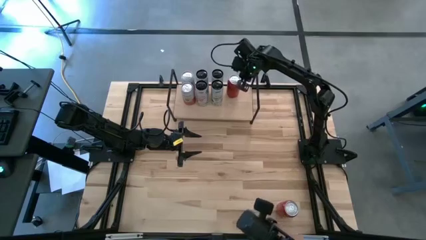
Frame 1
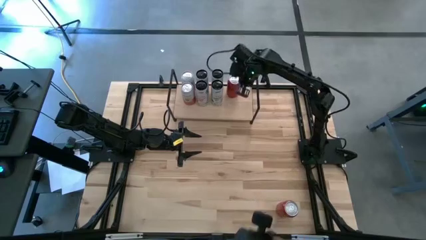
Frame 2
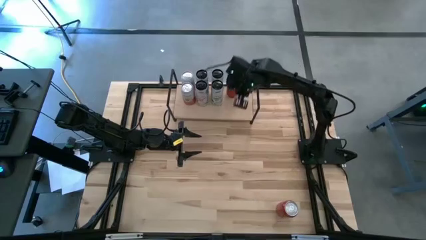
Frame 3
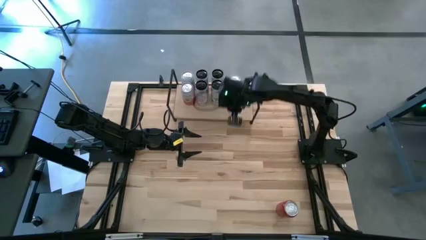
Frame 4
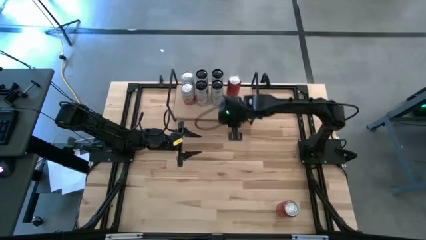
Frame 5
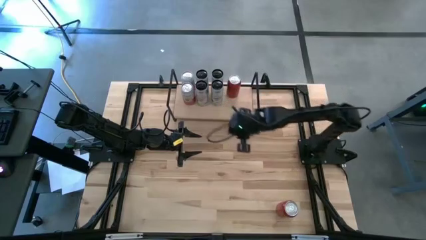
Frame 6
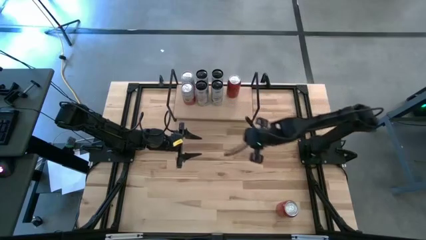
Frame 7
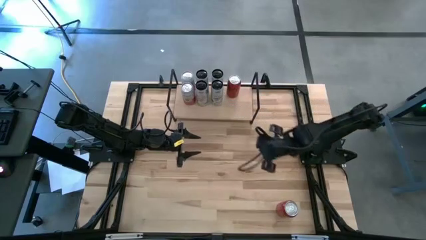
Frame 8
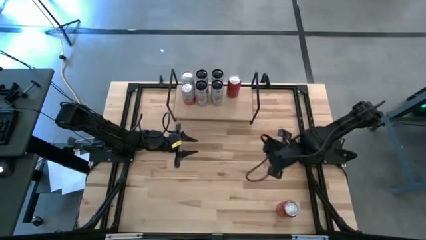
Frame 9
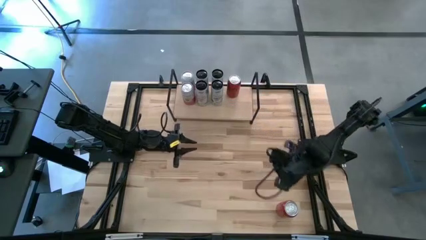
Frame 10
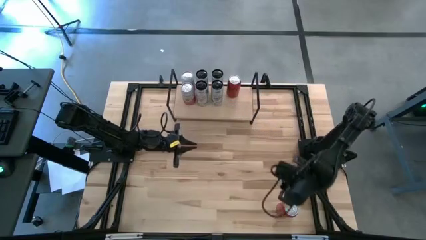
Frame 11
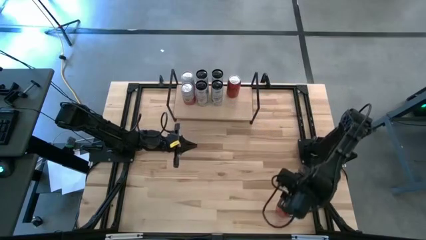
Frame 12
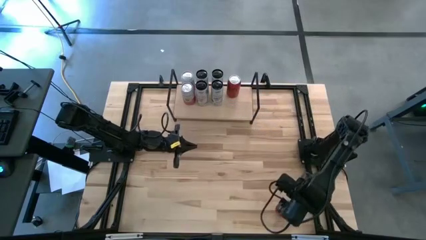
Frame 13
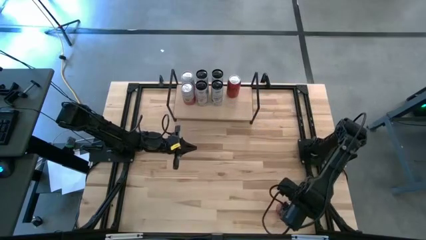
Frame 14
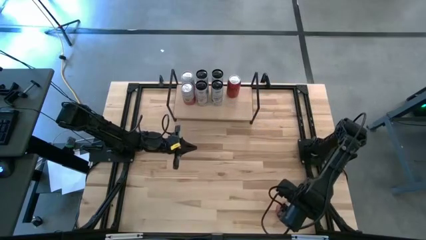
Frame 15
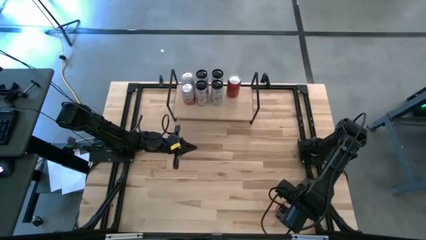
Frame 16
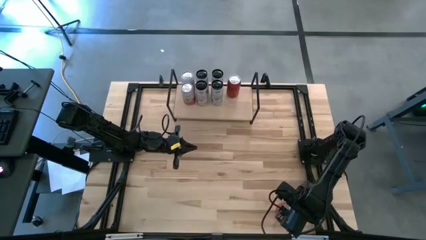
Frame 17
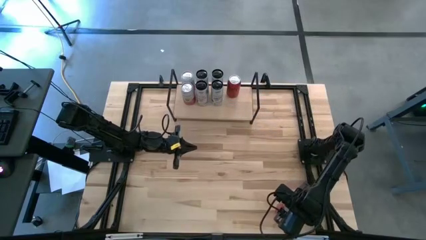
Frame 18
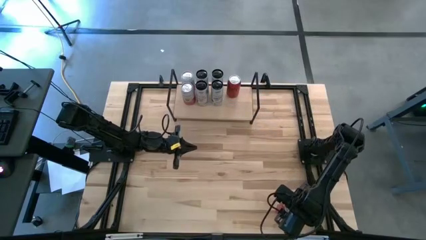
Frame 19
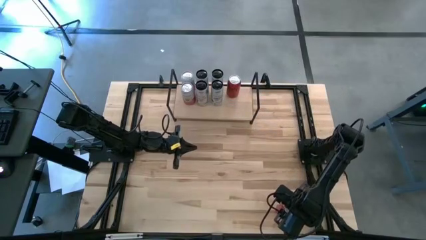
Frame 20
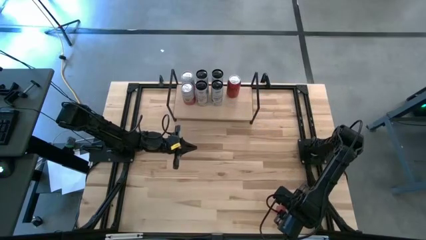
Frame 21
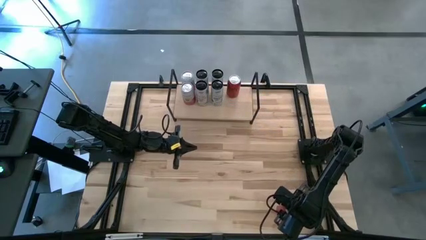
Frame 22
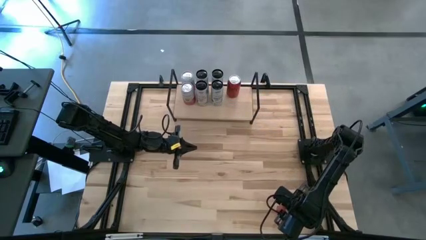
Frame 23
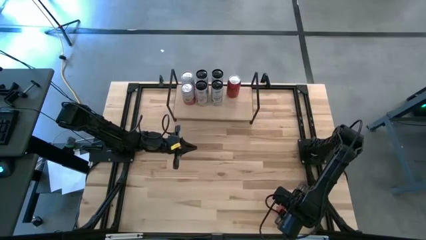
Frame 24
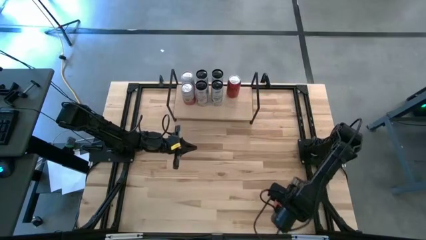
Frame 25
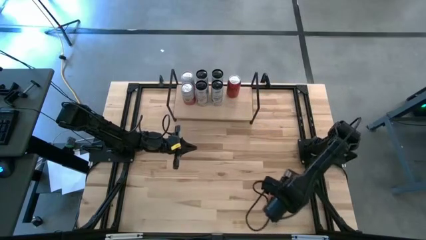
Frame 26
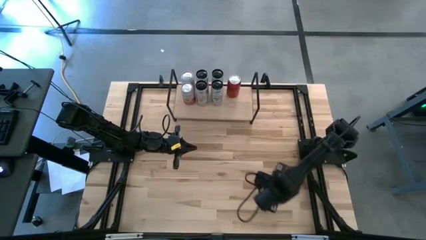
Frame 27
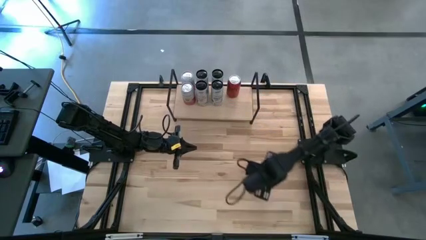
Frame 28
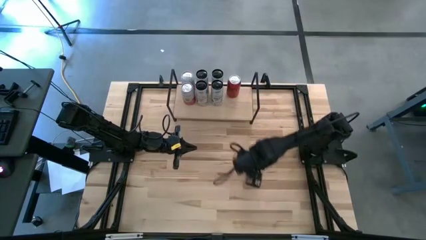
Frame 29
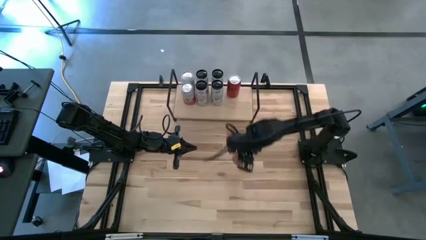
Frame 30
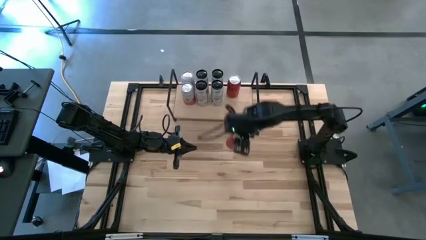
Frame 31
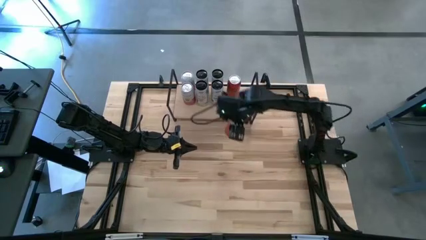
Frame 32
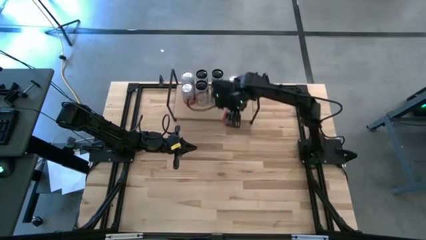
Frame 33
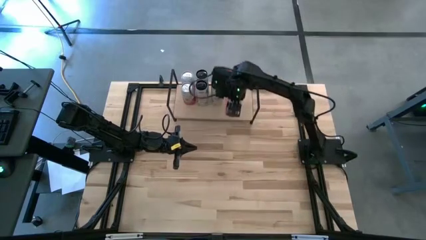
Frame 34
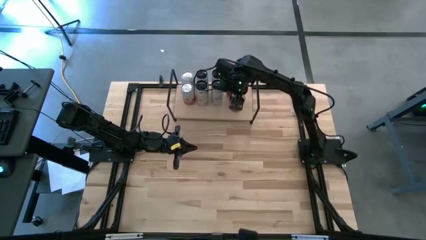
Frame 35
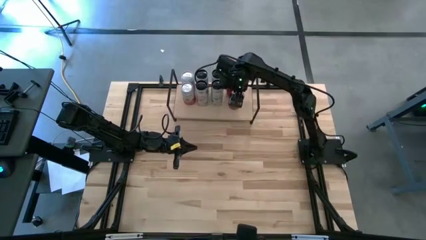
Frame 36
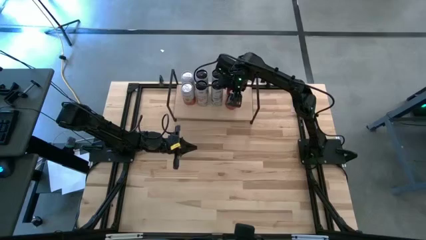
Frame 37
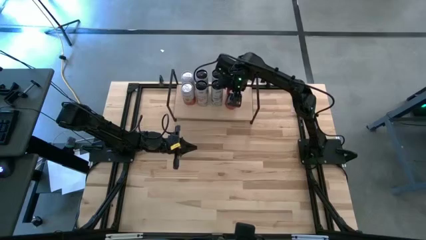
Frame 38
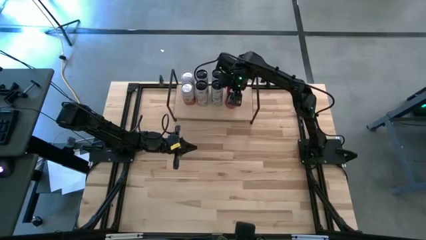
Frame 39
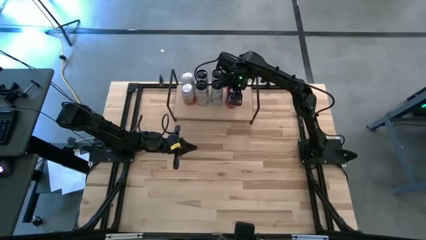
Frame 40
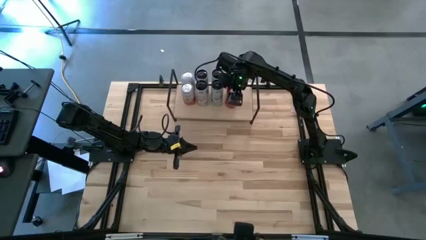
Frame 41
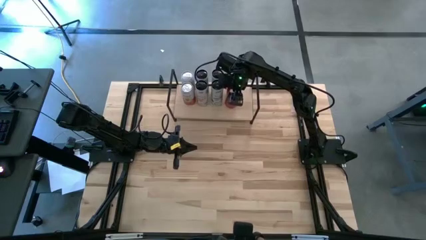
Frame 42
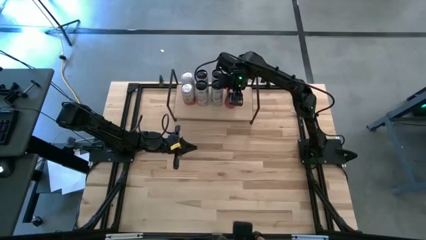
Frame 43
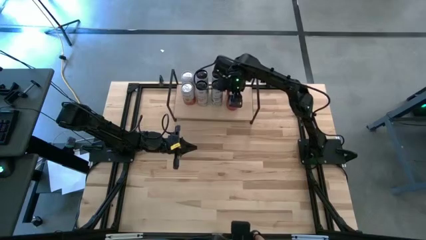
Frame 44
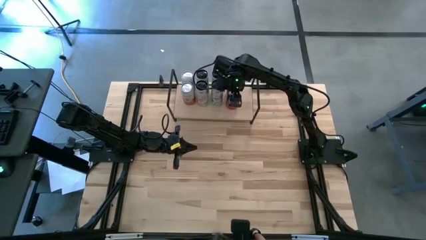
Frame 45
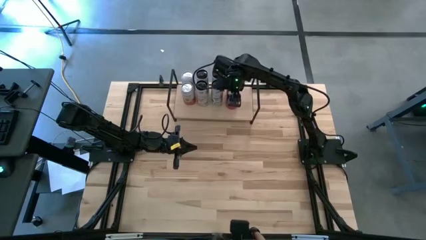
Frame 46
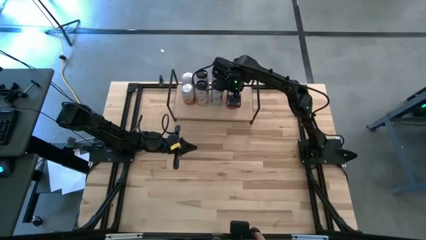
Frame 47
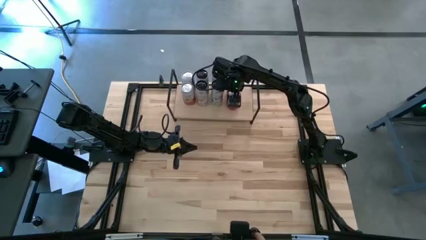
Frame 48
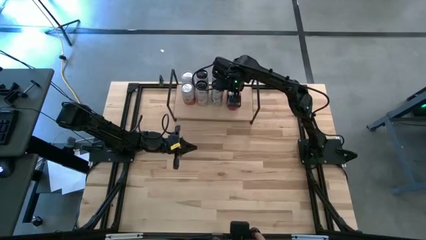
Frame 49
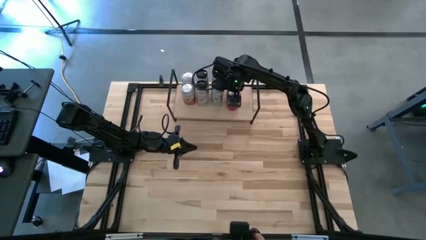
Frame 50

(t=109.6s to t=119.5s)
Task: Place canned beverage on shelf
Put the red soda can on the shelf aligned with the other red soda can

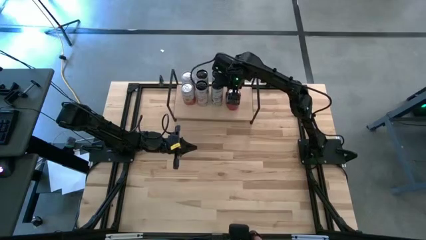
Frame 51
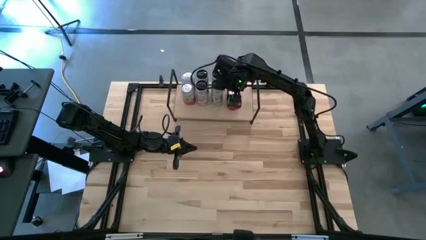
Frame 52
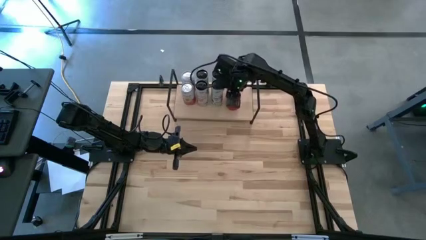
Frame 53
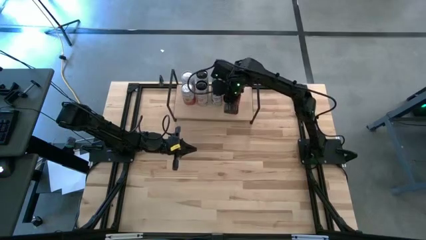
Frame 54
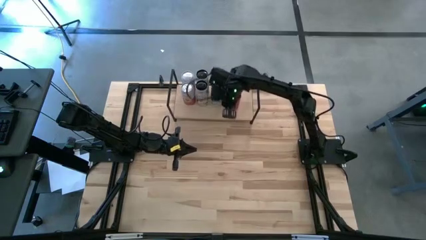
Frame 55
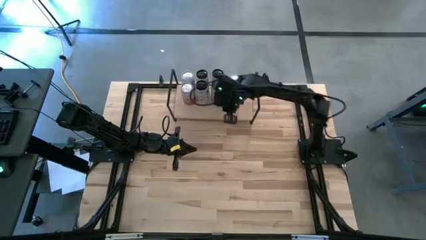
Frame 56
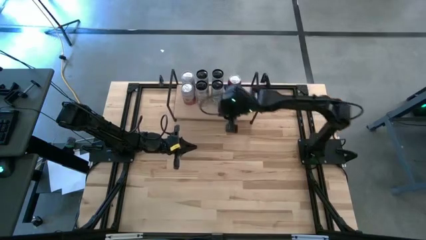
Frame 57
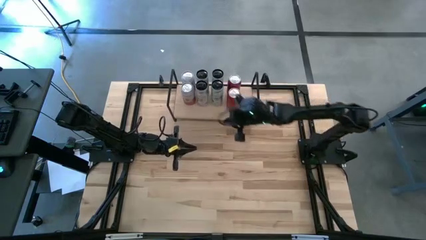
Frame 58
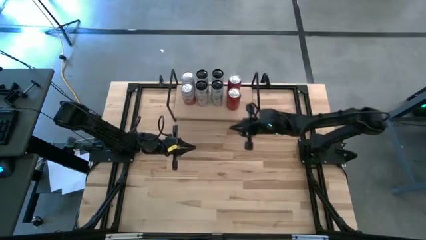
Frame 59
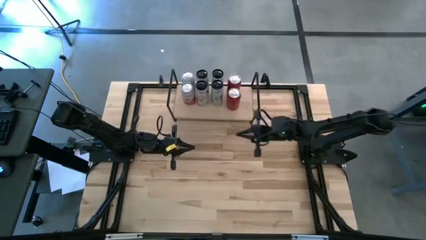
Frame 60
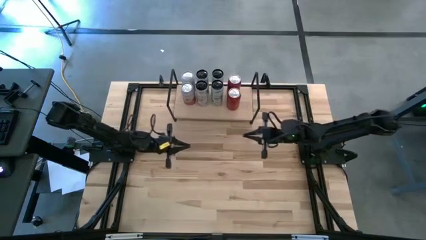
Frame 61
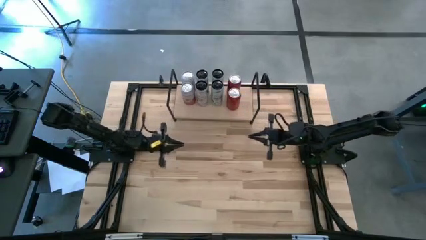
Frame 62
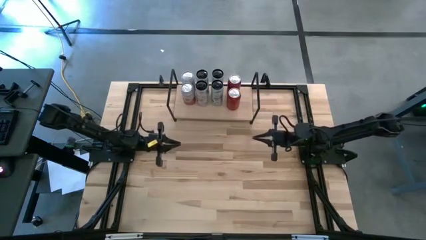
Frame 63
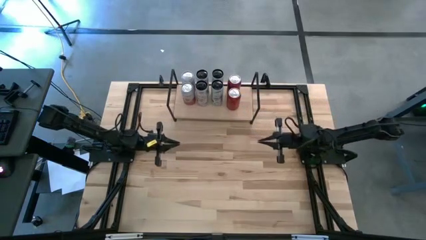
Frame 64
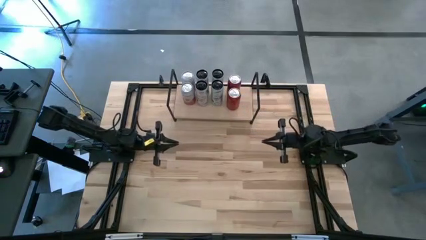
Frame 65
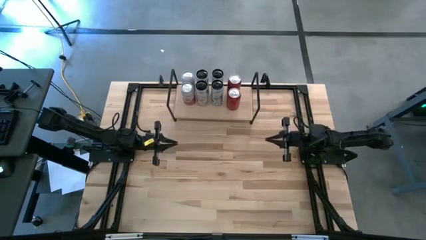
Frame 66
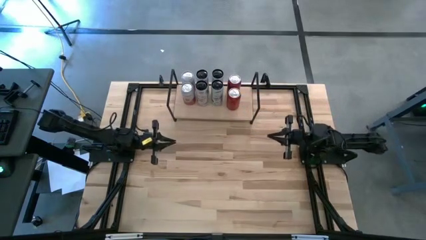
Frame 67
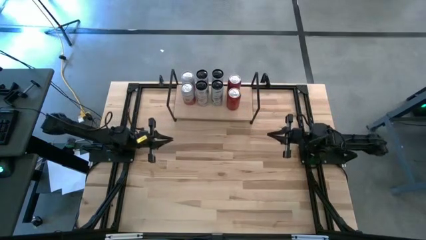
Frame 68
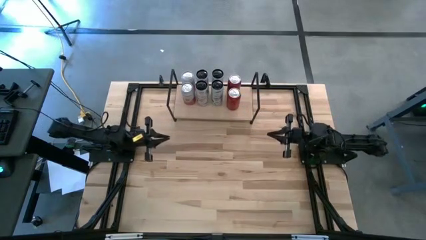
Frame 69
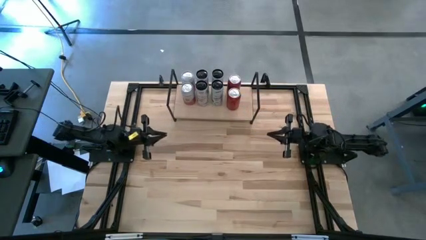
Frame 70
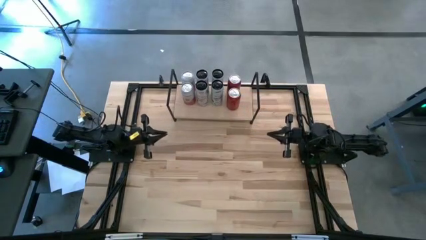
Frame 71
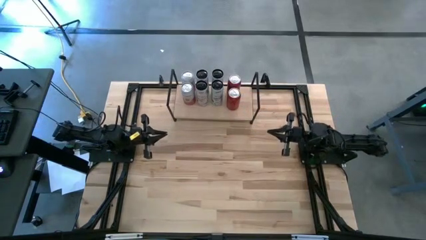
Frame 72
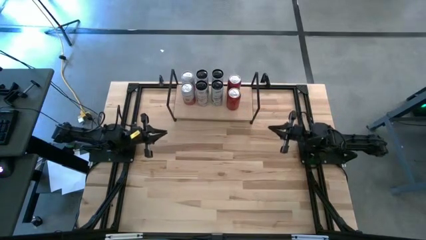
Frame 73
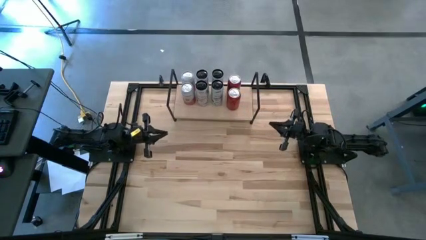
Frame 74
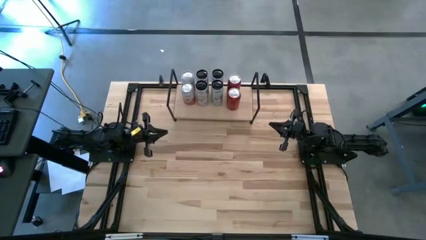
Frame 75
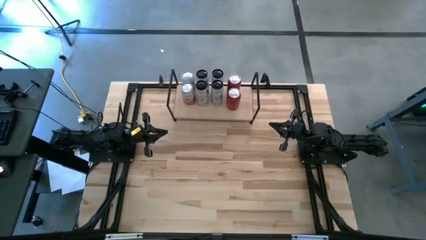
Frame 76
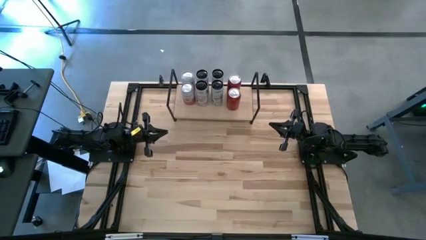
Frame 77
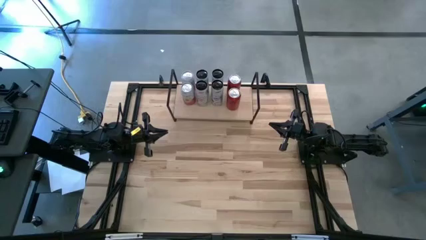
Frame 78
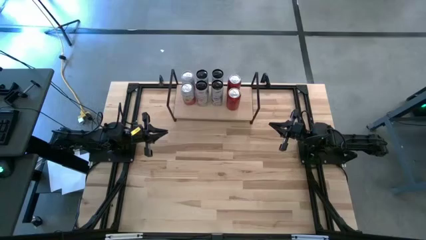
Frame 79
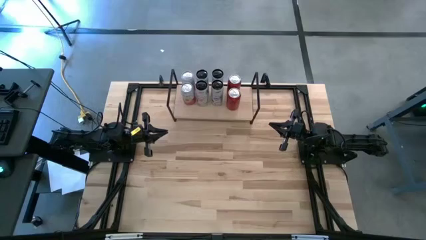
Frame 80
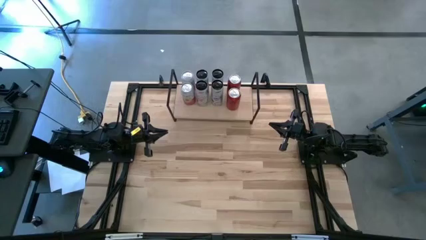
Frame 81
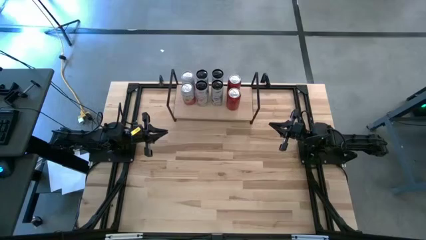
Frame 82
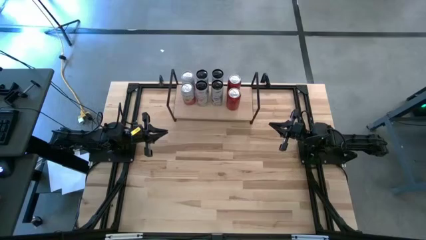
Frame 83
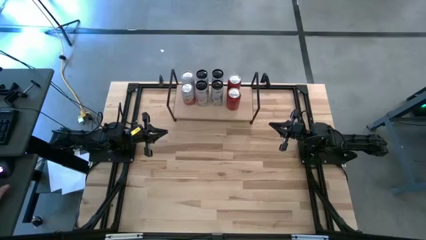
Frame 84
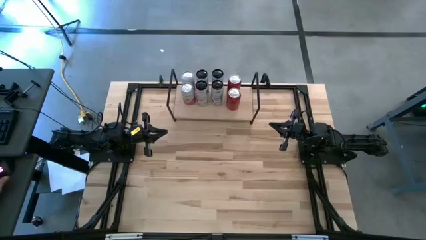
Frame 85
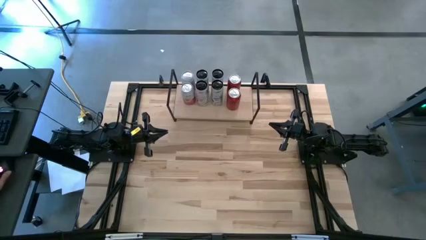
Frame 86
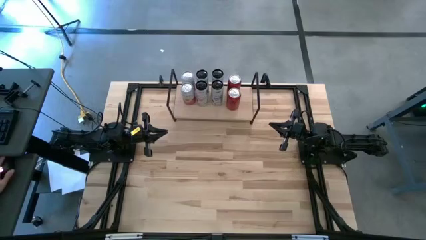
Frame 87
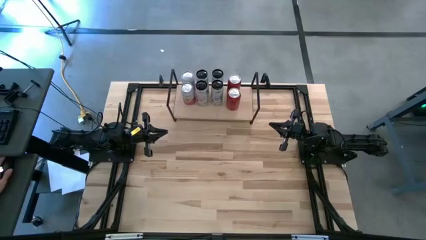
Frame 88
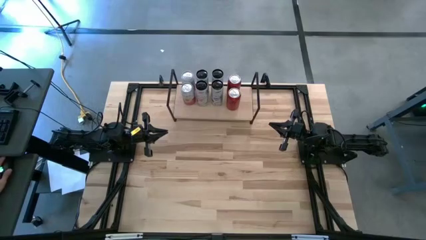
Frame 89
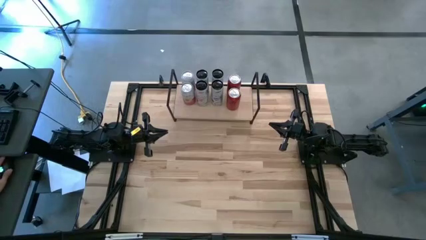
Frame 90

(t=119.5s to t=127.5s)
Return to Home Position
